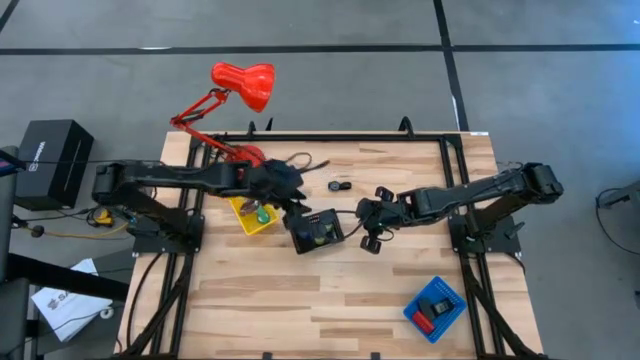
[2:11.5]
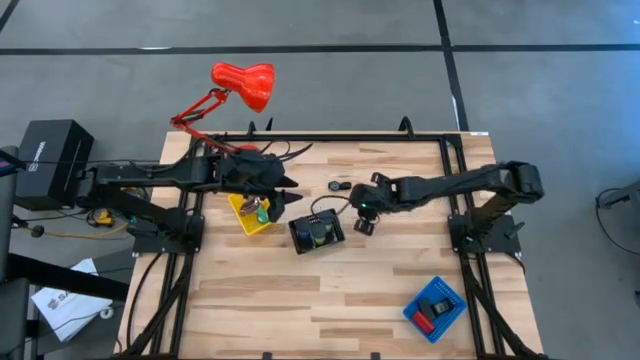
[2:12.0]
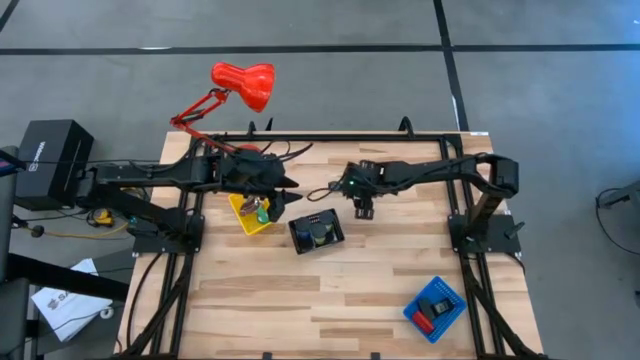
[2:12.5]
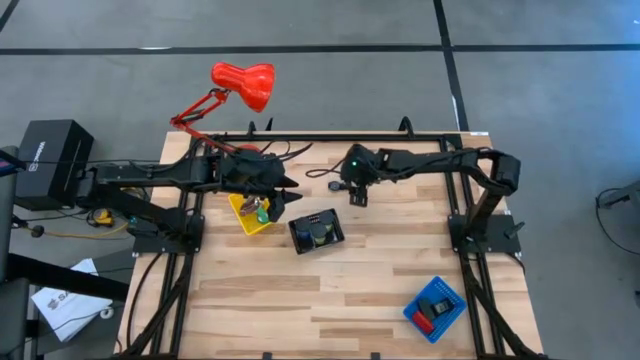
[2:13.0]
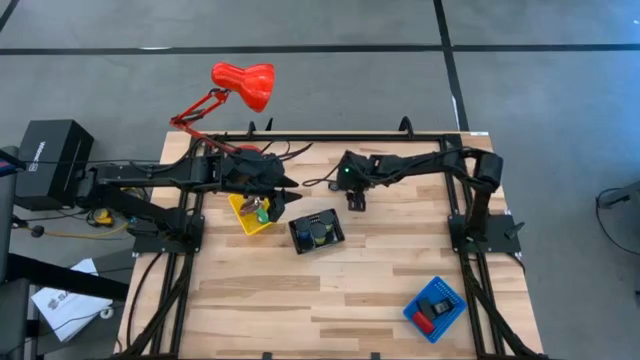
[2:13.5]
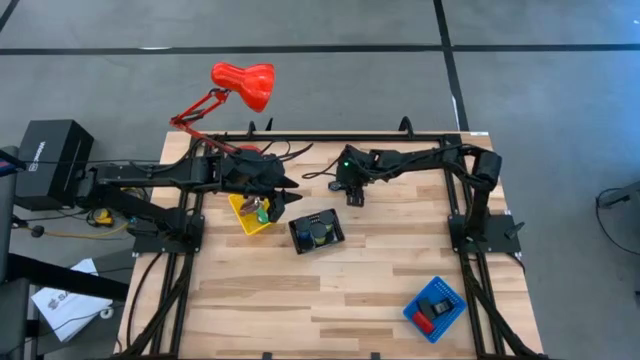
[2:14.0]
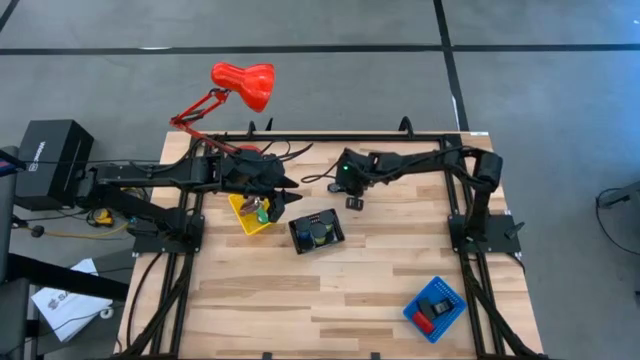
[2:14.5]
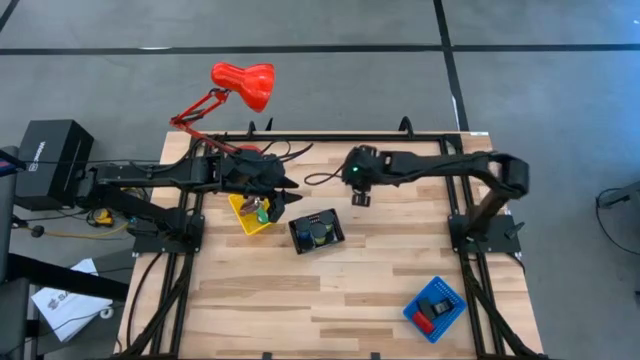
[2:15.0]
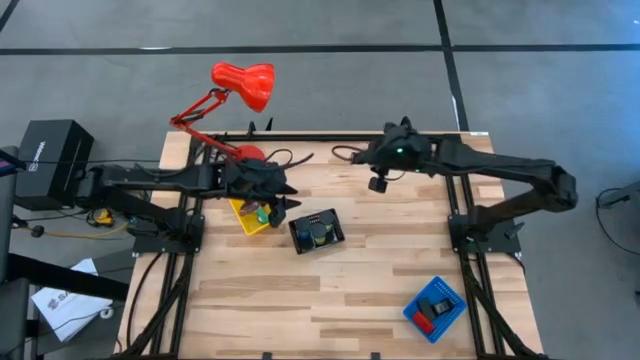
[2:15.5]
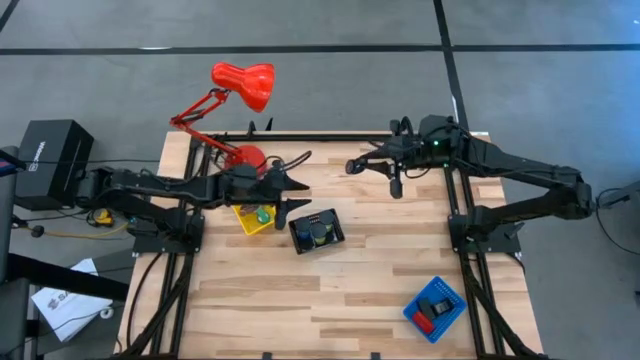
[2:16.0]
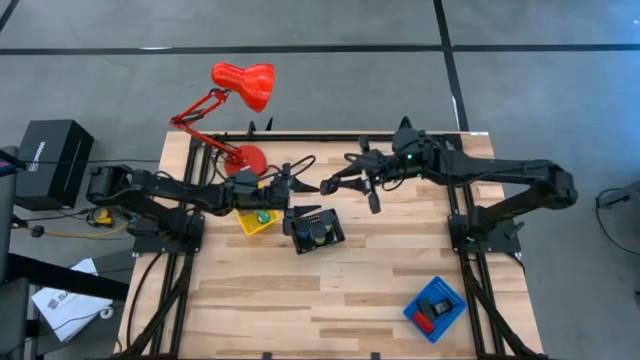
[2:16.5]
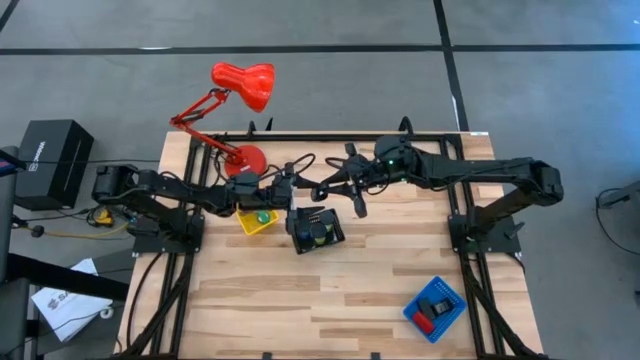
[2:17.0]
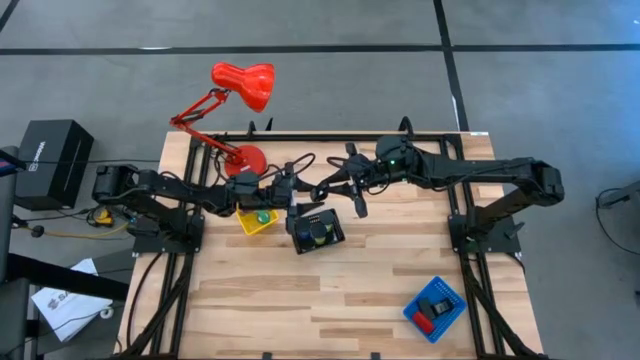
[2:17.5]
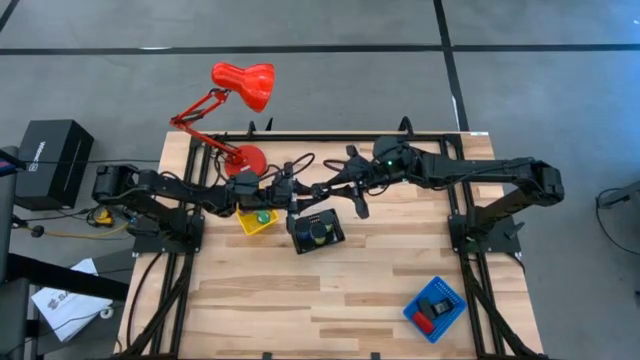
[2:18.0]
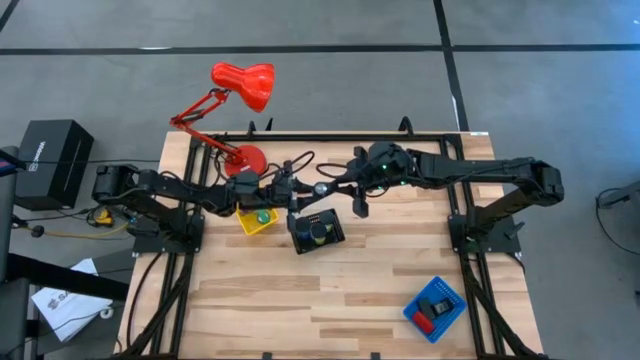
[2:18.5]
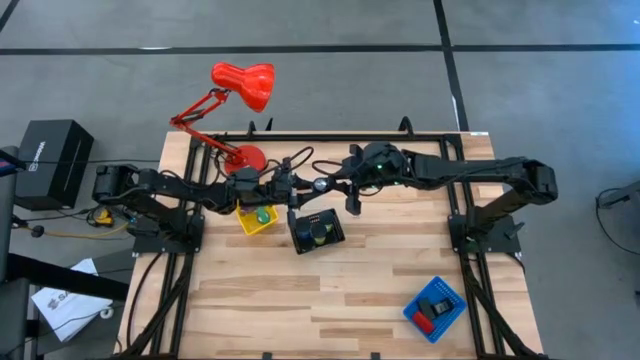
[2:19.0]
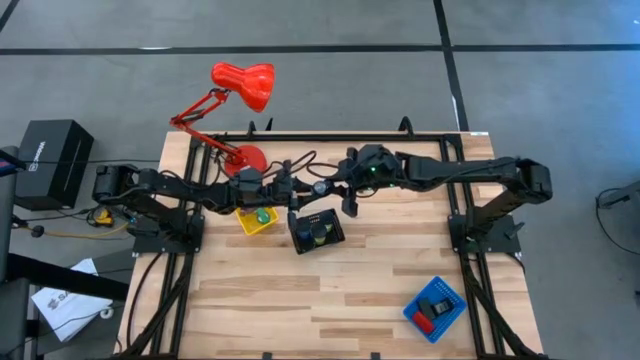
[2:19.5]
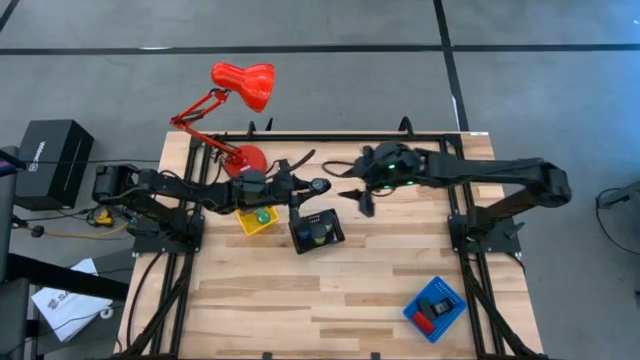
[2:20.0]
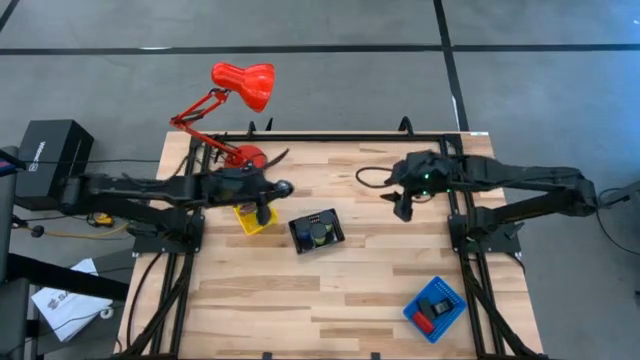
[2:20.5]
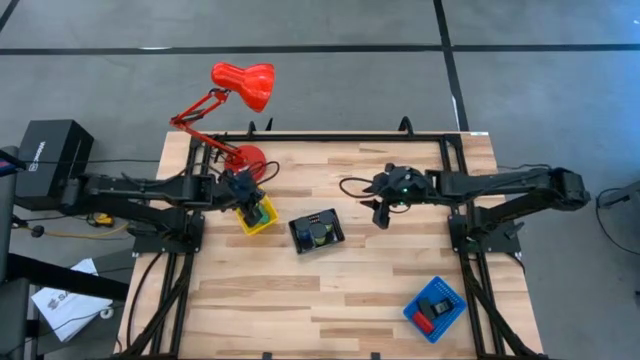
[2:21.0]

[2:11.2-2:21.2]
Task: Pick & Place Office items
Put the black wristwatch into the yellow bin

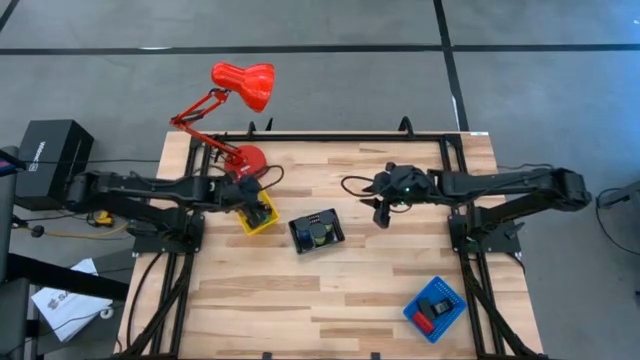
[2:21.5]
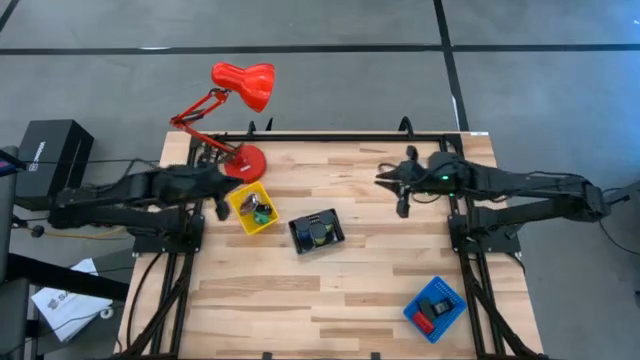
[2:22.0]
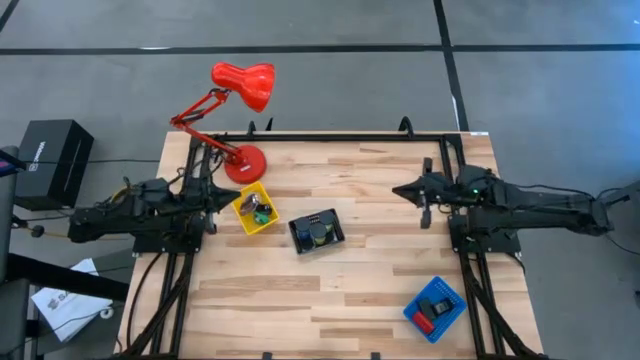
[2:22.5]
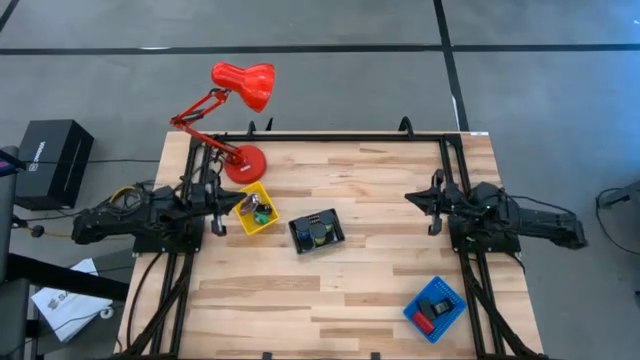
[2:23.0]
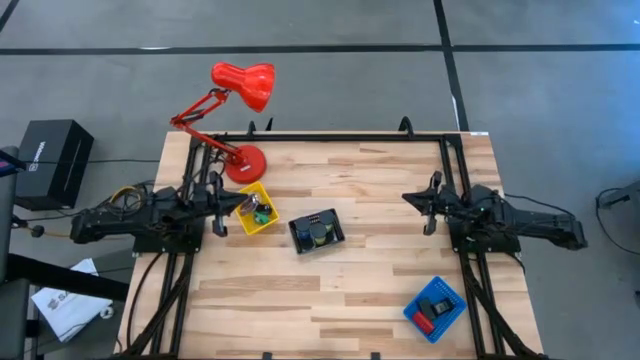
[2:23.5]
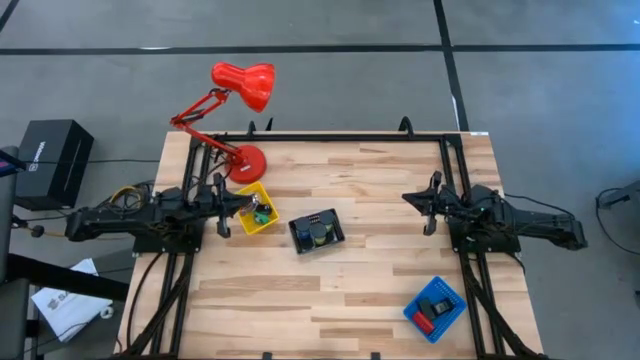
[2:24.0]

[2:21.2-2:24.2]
Return to Home Position

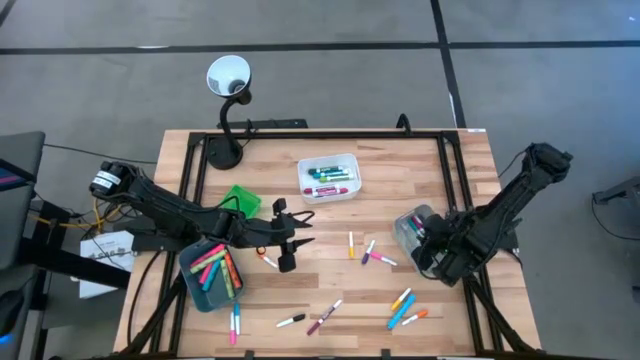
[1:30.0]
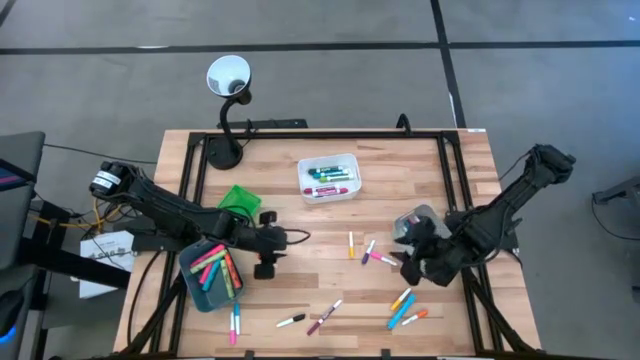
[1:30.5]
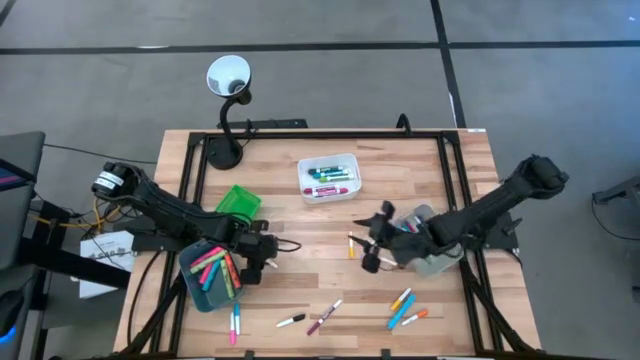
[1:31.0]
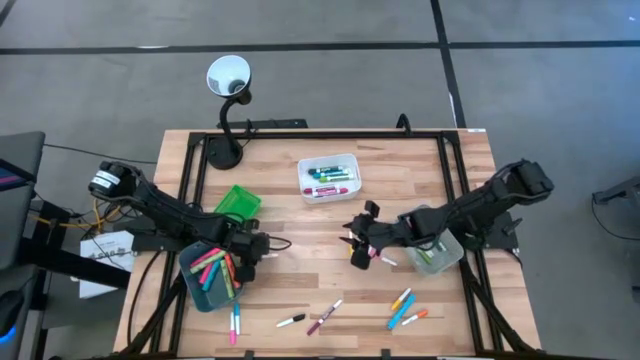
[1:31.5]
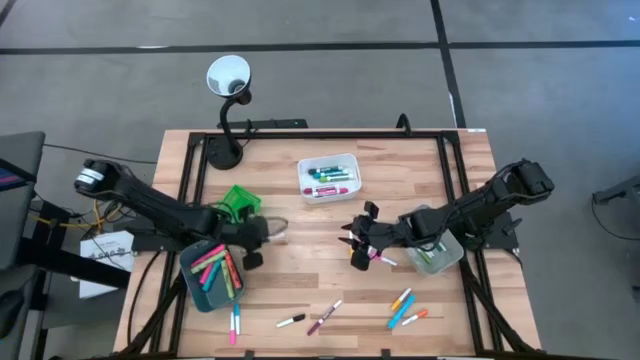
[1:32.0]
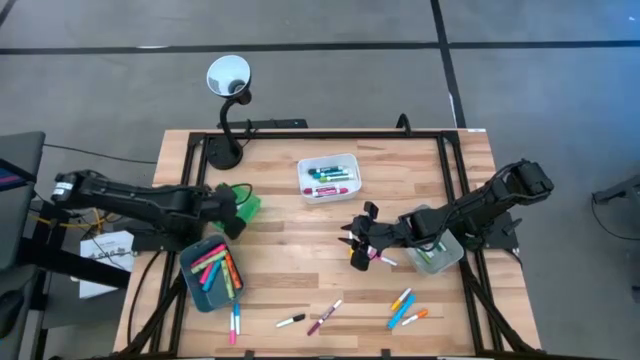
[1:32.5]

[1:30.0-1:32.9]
Task: Pick & Place Markers
Put the small orange highlighter pen into the green bin

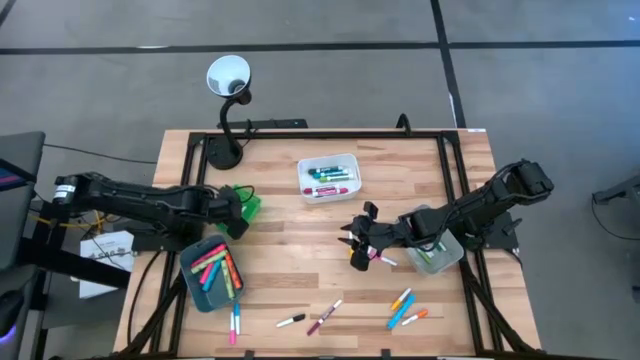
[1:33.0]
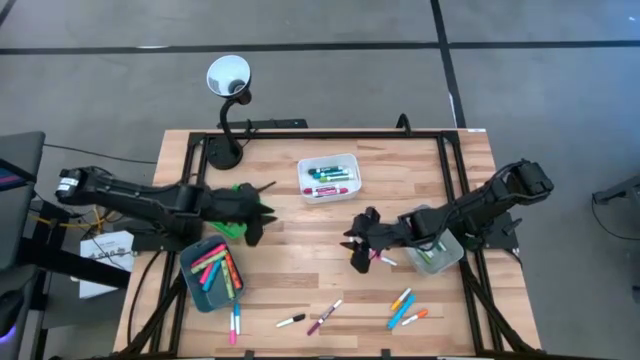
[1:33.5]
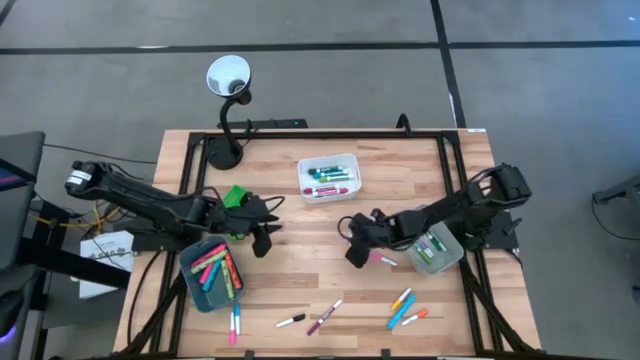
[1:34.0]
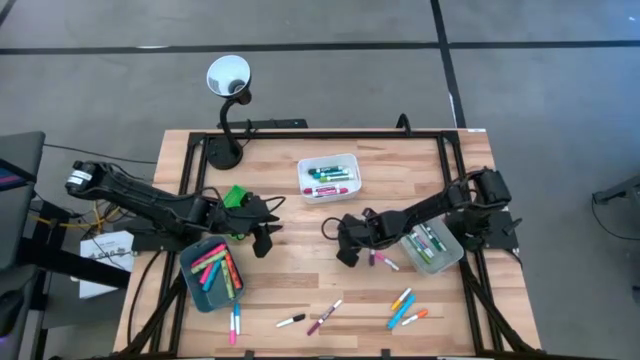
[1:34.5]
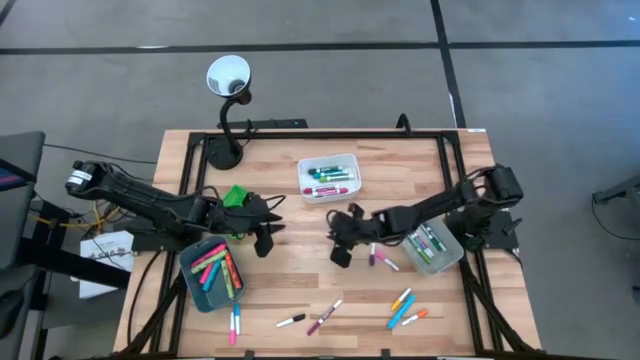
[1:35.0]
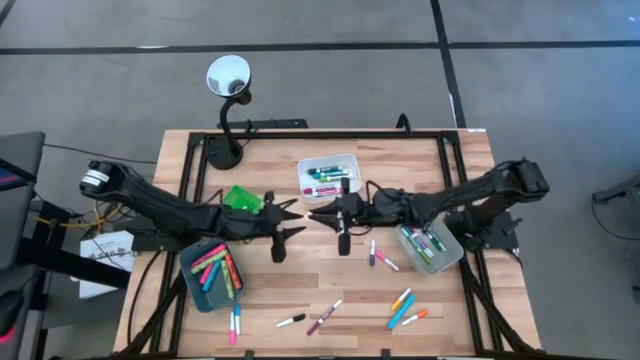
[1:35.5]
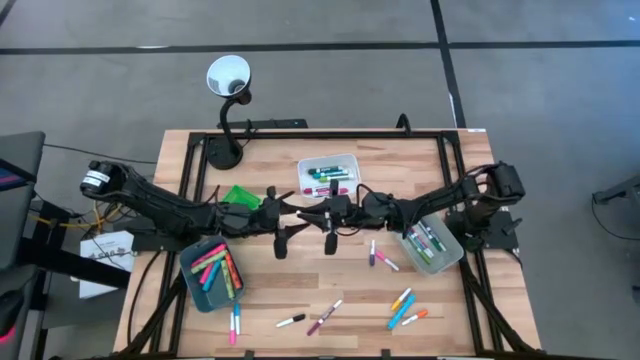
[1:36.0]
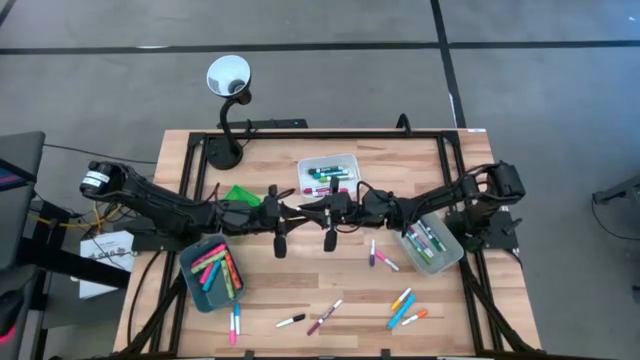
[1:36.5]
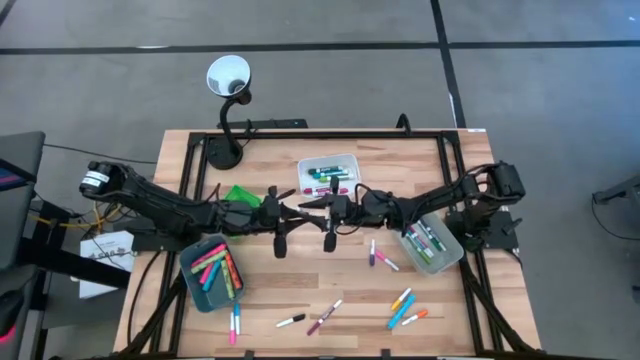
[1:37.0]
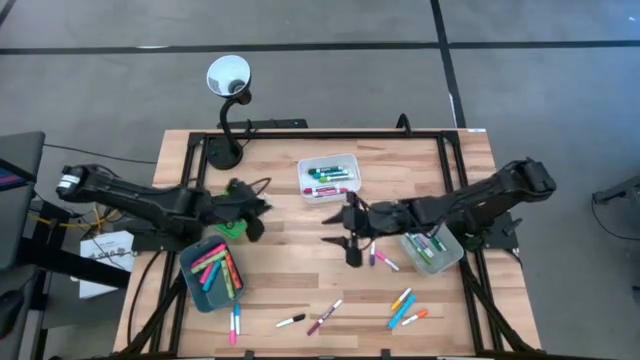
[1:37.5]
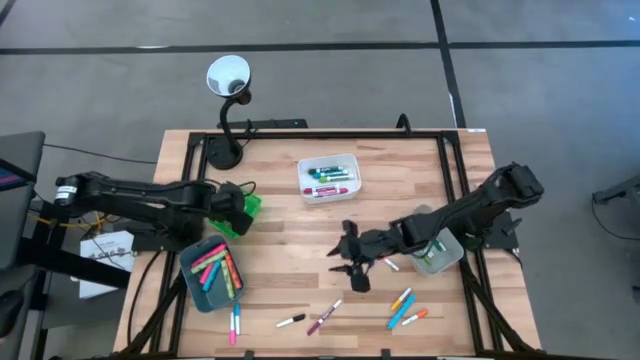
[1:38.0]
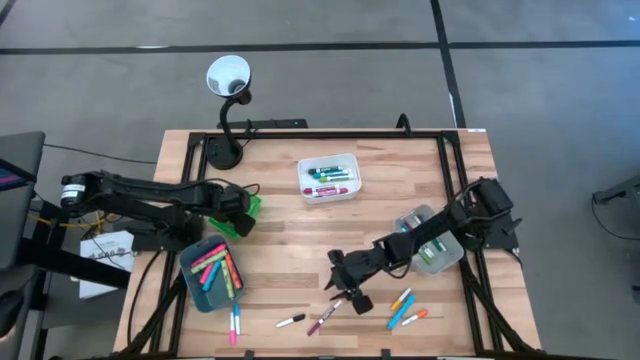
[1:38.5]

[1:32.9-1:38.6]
Put the small yellow highlighter pen into the green bin
